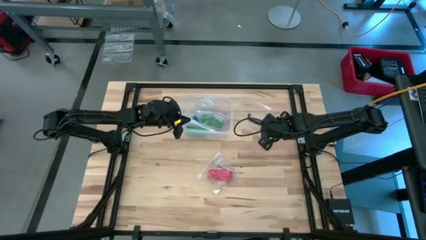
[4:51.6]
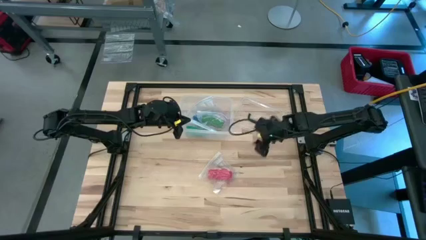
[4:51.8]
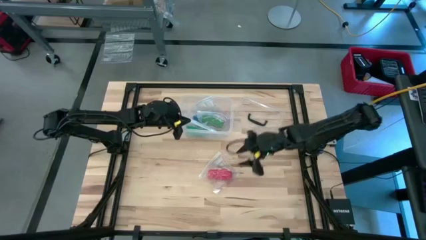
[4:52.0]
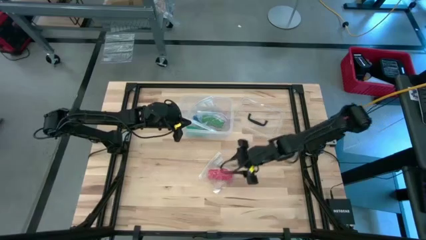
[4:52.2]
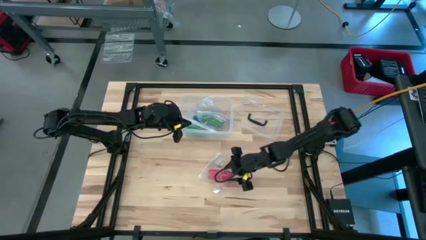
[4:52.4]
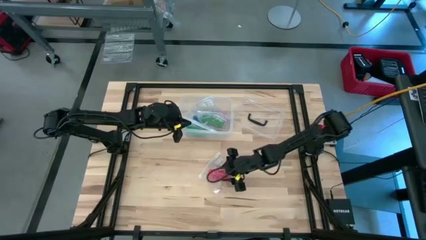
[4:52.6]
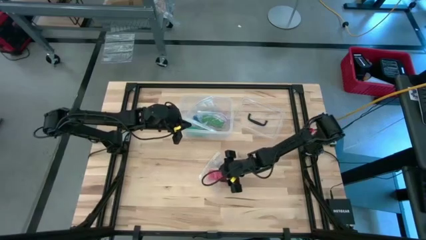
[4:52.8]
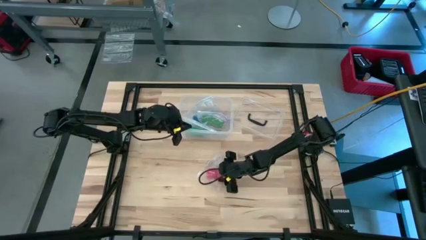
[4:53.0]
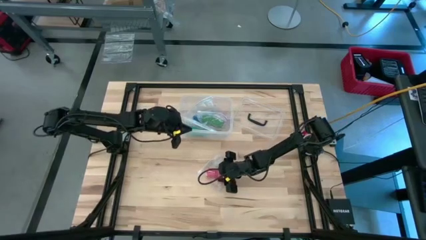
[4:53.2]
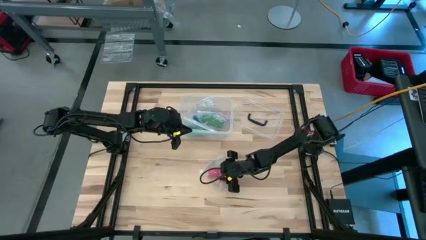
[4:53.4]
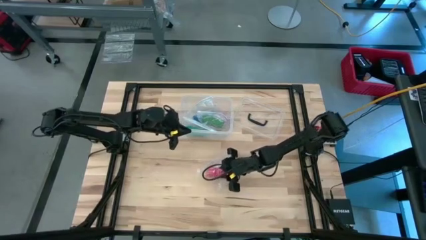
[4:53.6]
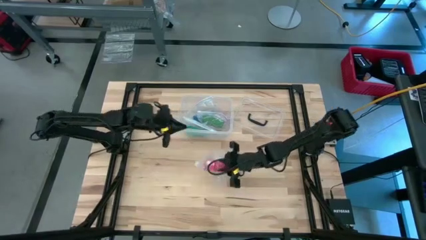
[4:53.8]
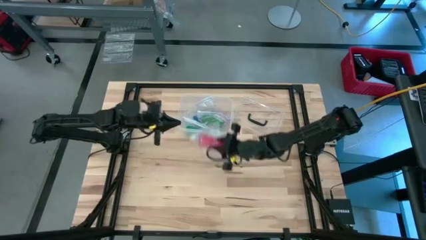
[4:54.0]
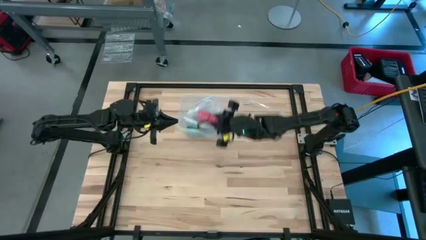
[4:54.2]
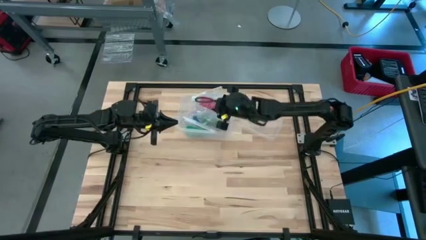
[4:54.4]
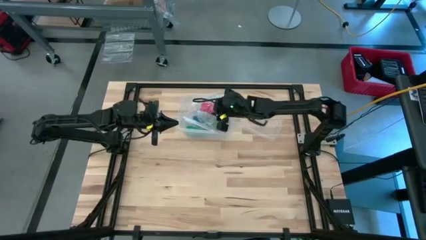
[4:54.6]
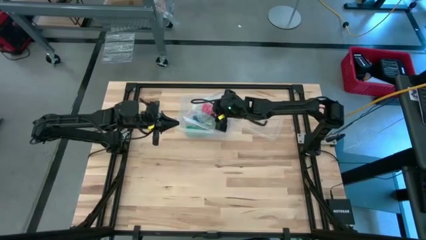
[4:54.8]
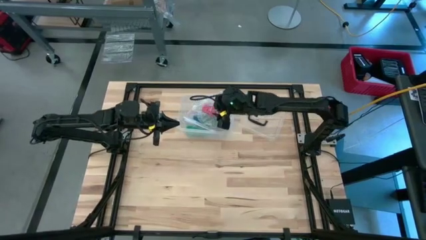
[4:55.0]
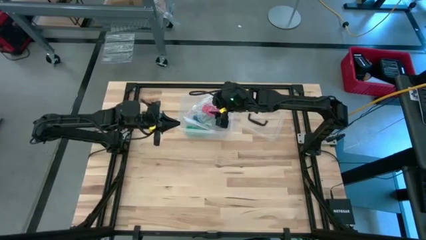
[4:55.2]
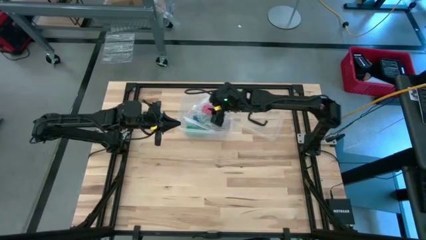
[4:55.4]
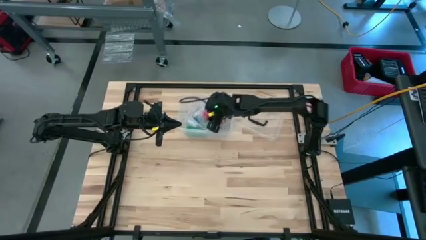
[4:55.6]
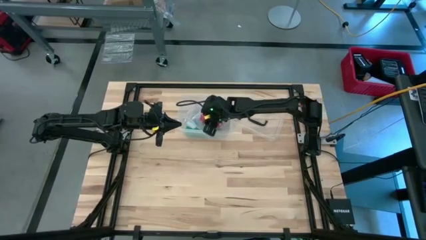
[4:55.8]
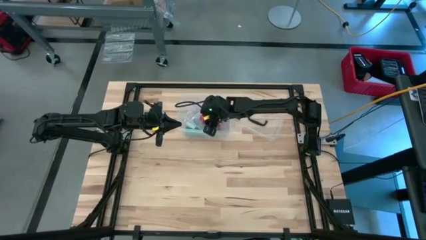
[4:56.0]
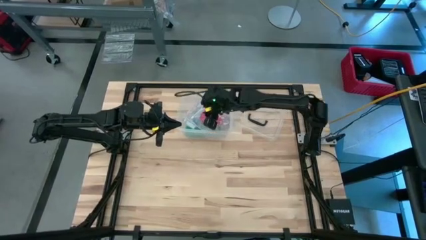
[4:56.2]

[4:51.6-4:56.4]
Task: Roll bandage
Put the transparent zip bag into the transparent container

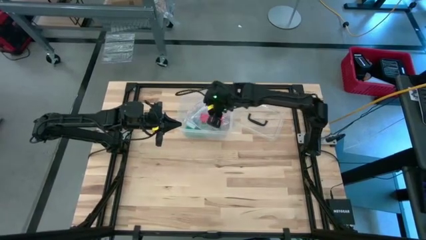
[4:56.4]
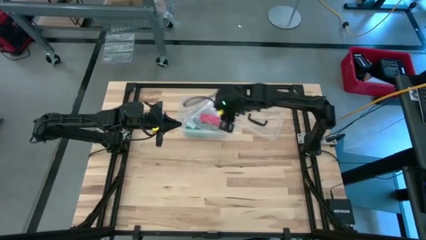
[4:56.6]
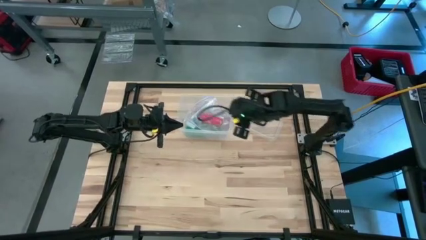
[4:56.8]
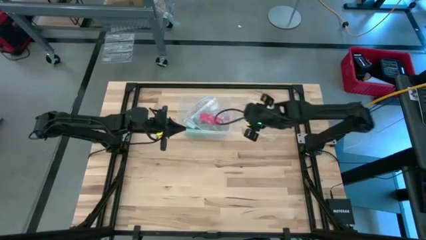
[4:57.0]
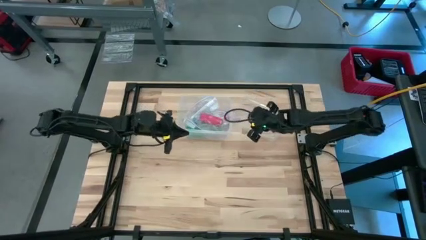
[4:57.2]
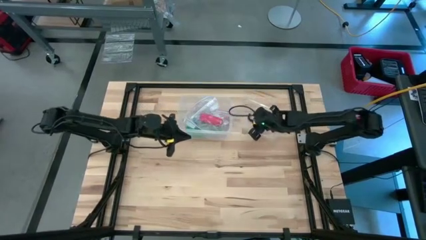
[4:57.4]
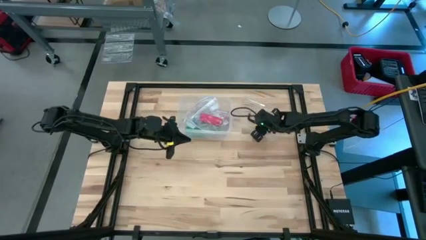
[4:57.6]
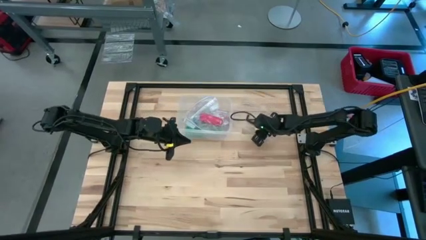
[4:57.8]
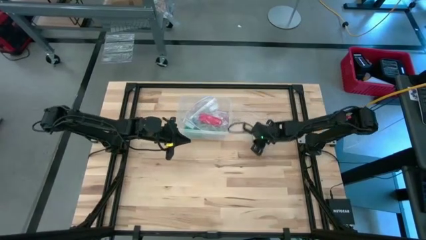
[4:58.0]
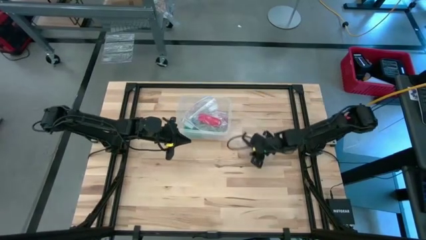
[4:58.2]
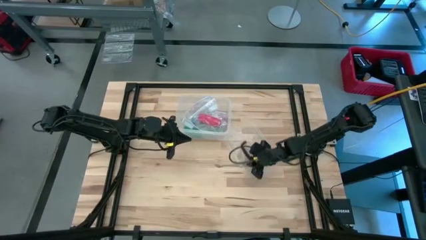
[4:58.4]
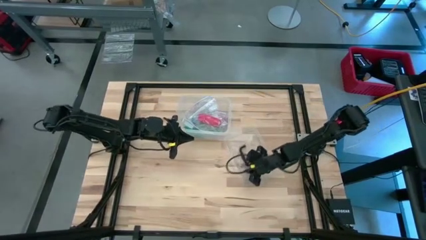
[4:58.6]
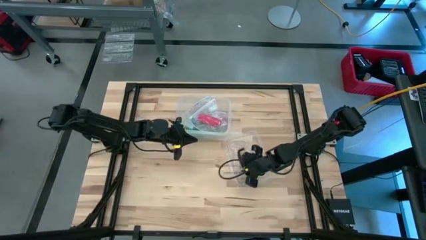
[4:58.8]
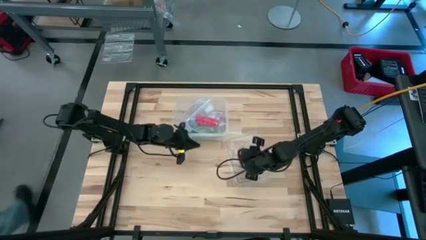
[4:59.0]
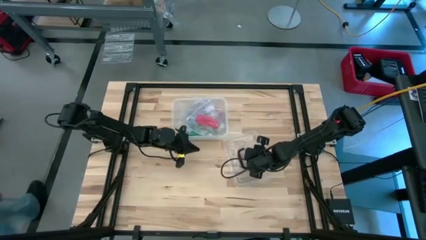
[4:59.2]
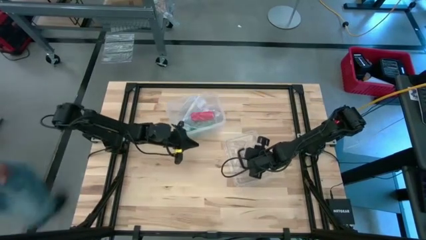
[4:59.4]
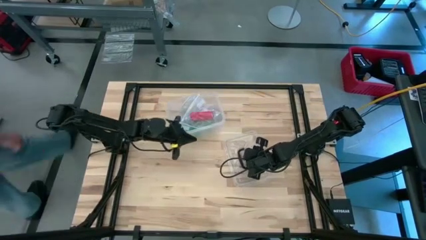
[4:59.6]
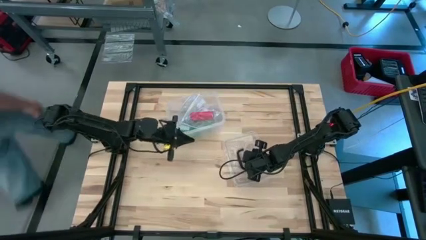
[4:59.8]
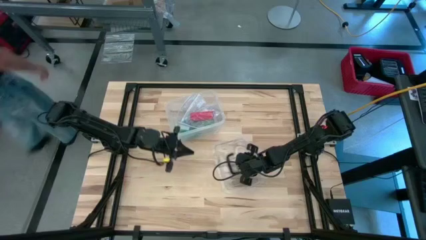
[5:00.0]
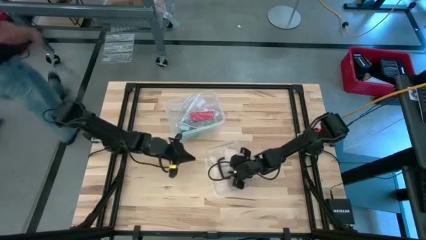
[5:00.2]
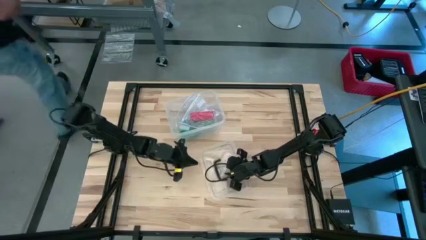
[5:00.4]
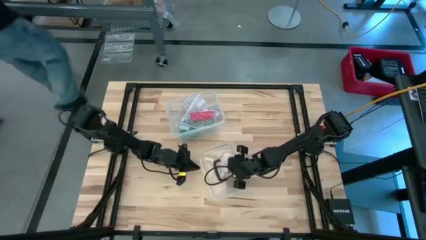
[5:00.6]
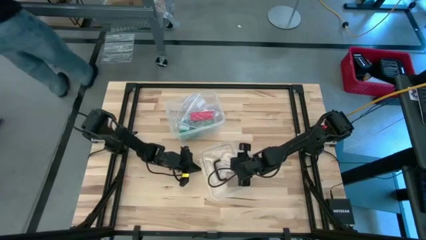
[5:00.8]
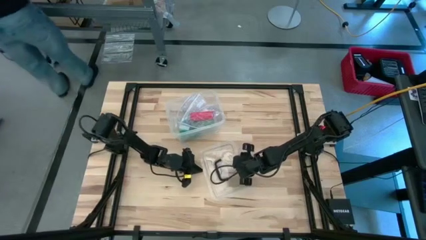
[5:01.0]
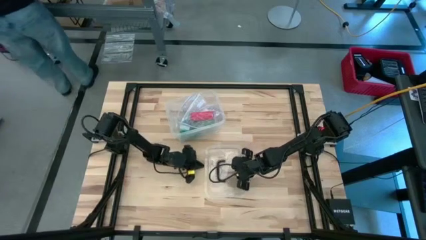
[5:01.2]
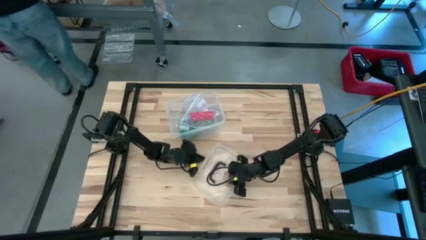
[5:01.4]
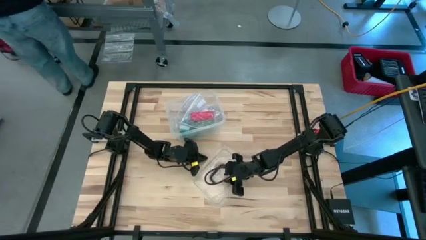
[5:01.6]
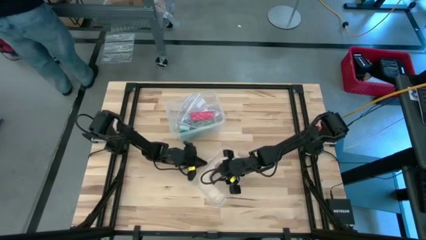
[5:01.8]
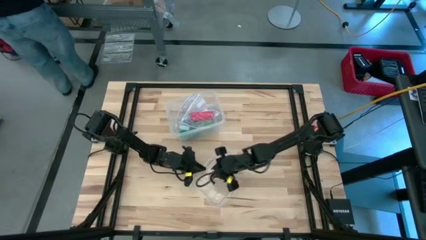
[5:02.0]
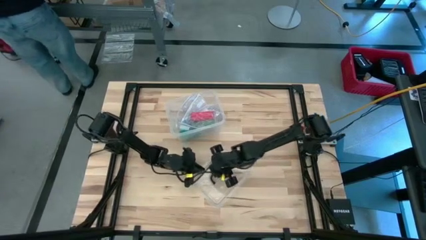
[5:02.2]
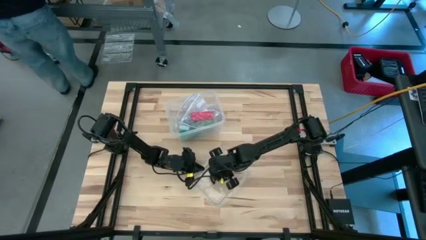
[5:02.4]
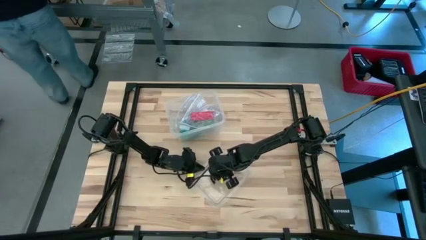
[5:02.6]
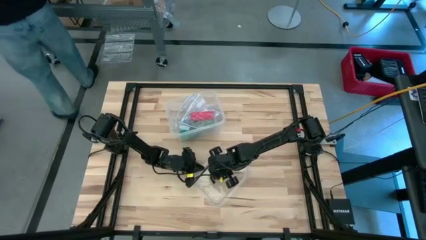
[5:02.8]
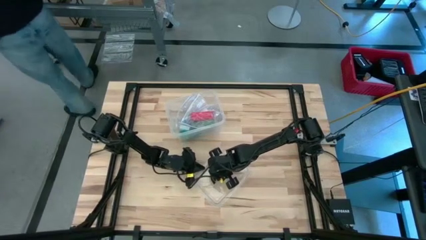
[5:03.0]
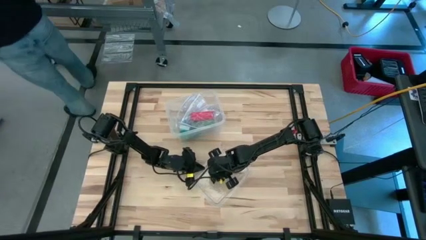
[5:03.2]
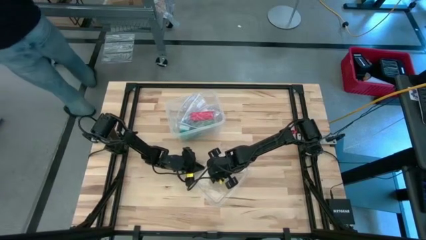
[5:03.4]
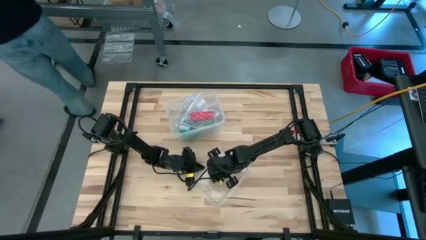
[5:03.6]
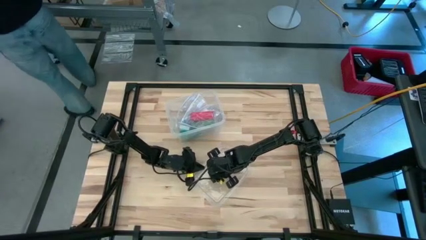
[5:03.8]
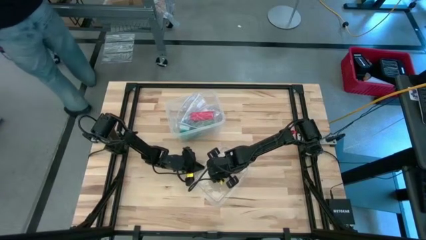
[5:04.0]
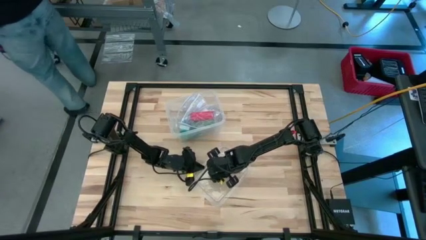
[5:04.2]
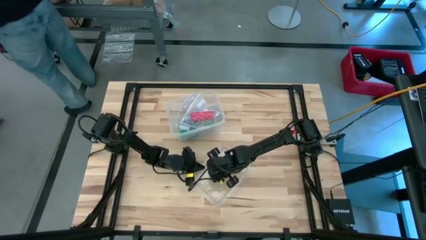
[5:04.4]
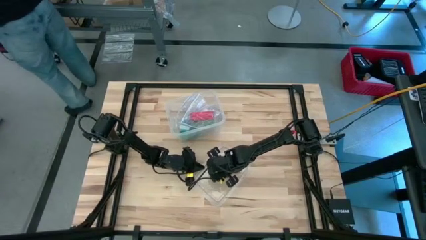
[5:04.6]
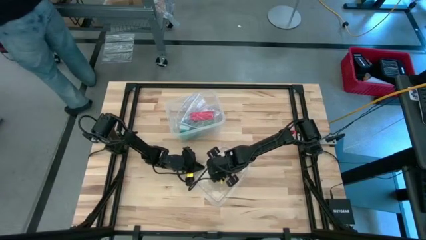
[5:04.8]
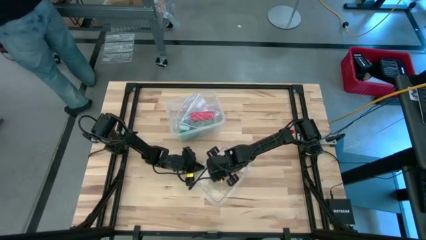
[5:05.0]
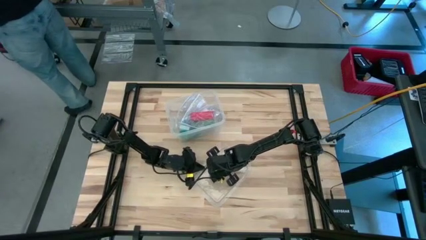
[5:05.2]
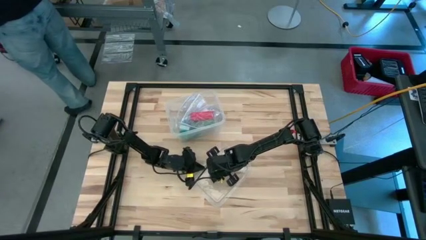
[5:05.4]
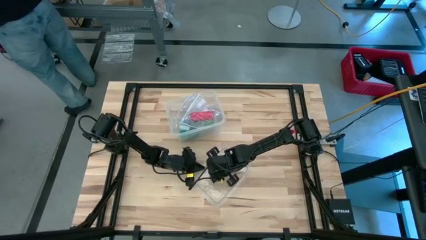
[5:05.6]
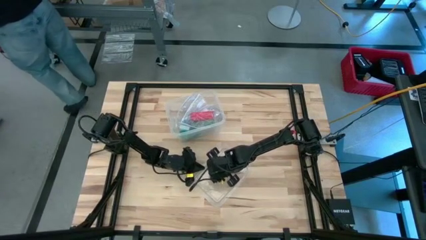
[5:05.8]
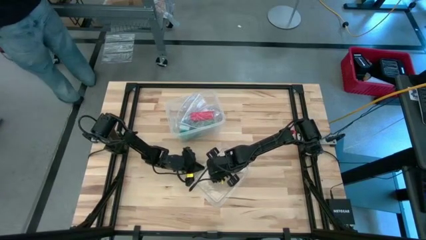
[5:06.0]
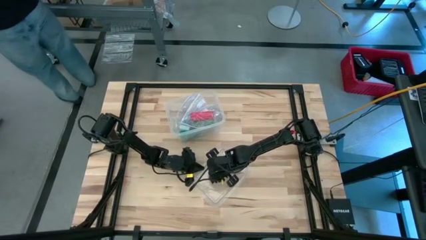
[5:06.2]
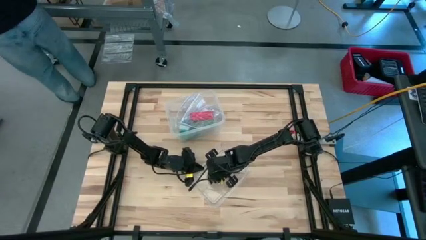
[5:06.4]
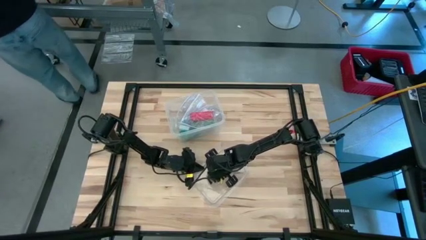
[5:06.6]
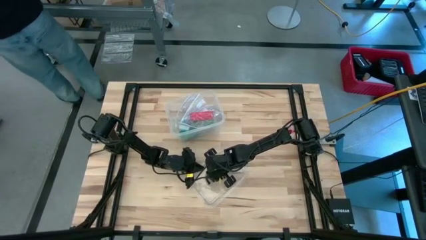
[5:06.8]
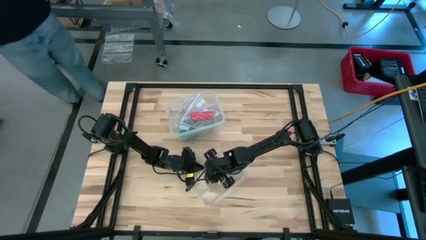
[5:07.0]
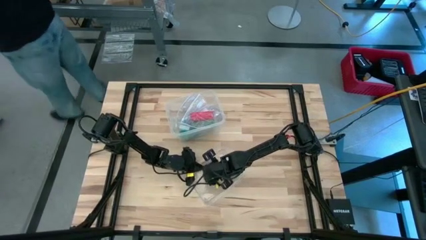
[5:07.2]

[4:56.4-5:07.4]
Close the transparent container

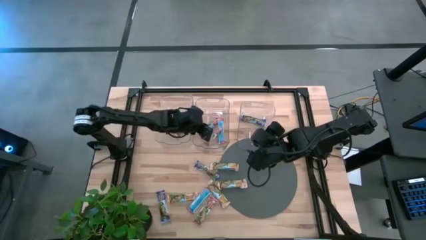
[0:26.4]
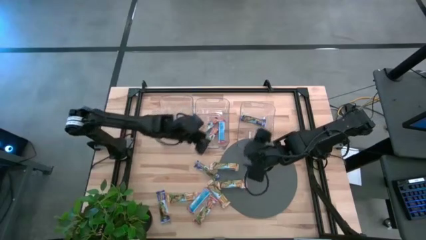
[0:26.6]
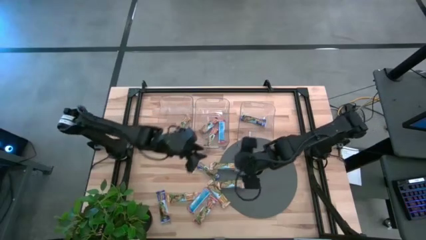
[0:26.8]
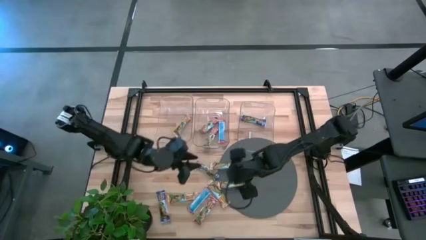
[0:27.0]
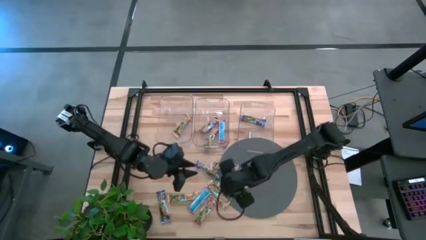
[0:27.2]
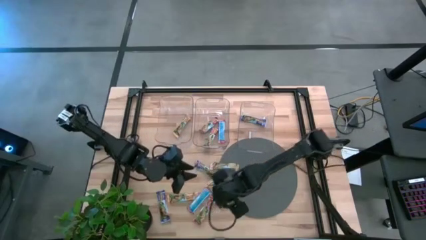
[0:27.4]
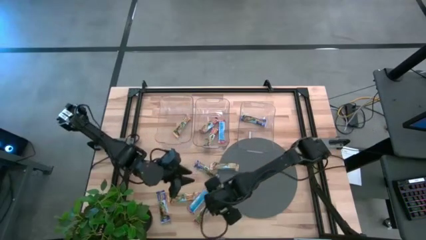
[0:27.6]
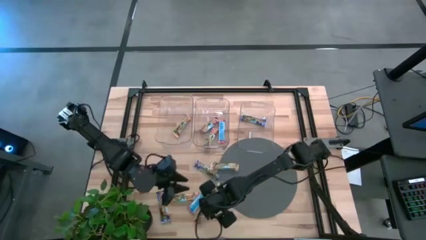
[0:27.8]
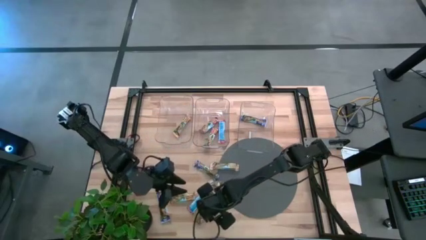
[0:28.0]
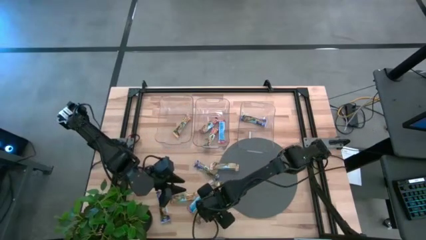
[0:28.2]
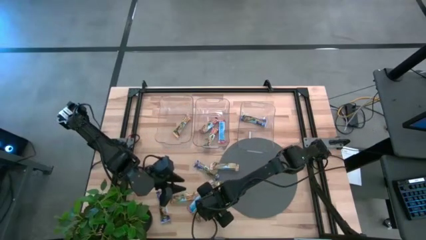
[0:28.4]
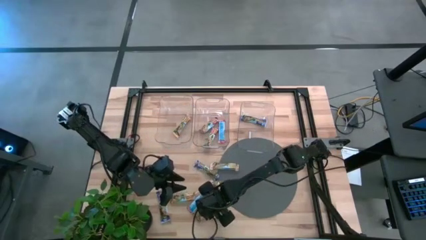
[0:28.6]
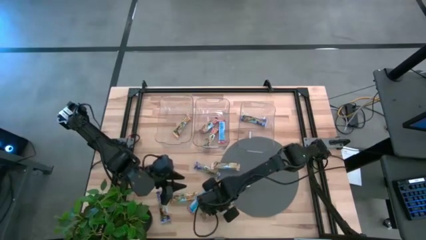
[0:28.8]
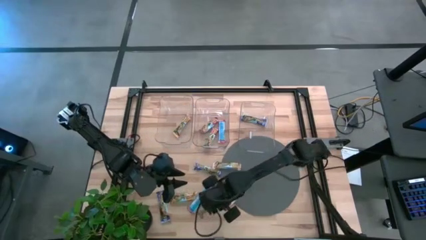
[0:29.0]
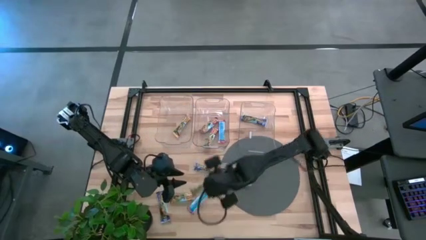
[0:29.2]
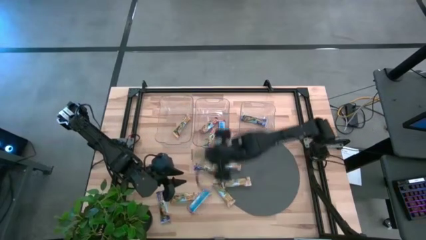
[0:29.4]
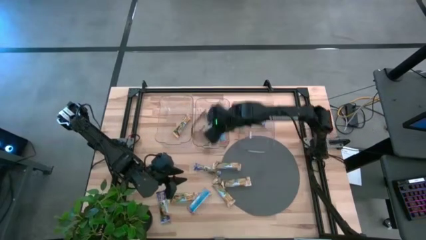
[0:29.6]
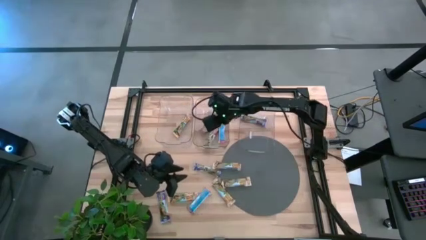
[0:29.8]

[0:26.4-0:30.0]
Task: Pick and place Granola Bars by type
Put the red granola bar into the middle transparent bin
